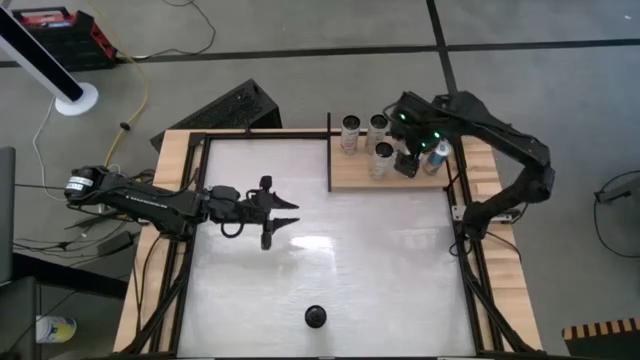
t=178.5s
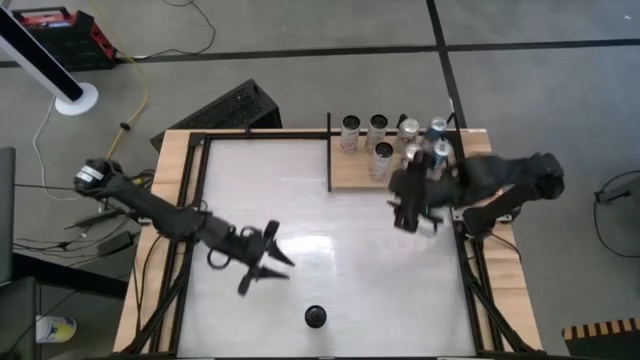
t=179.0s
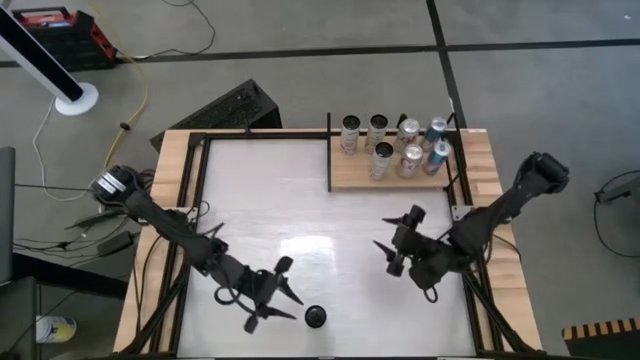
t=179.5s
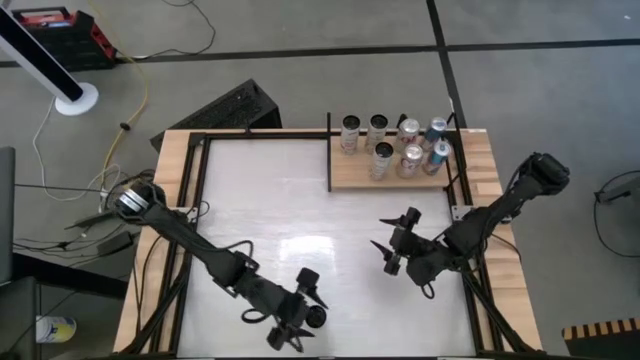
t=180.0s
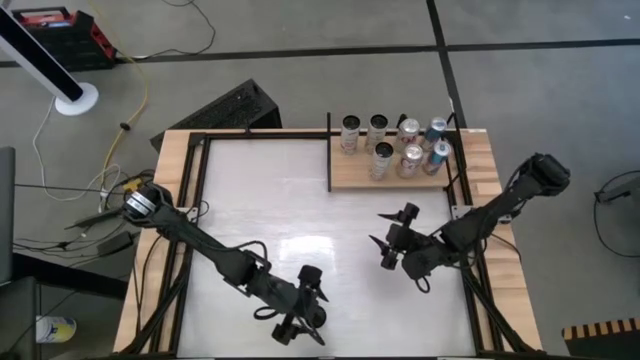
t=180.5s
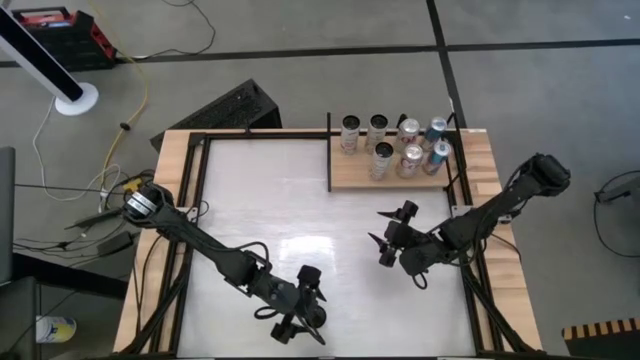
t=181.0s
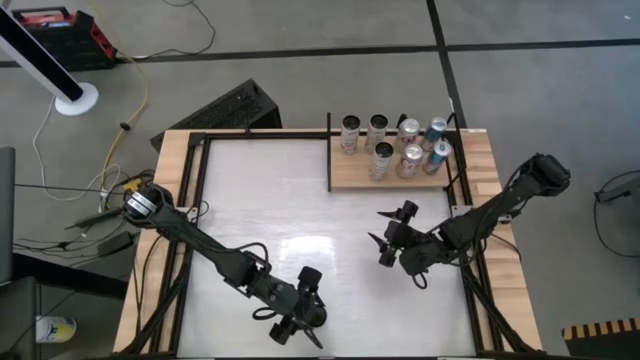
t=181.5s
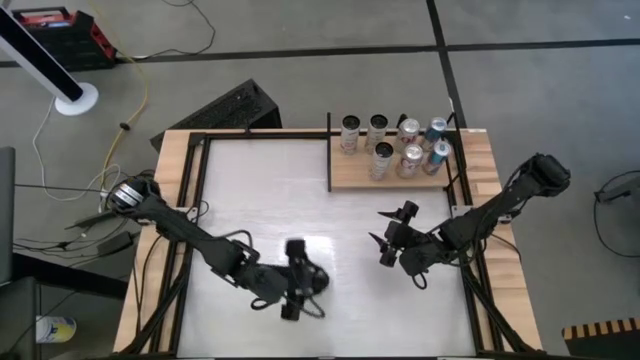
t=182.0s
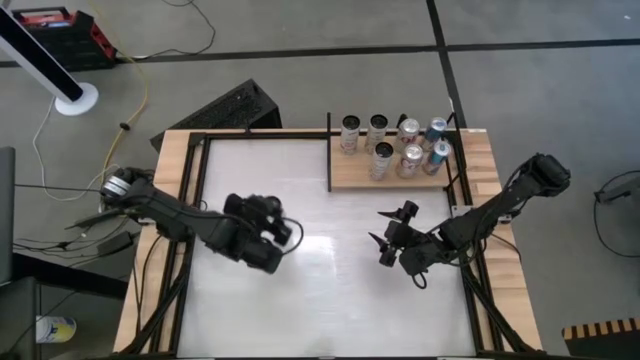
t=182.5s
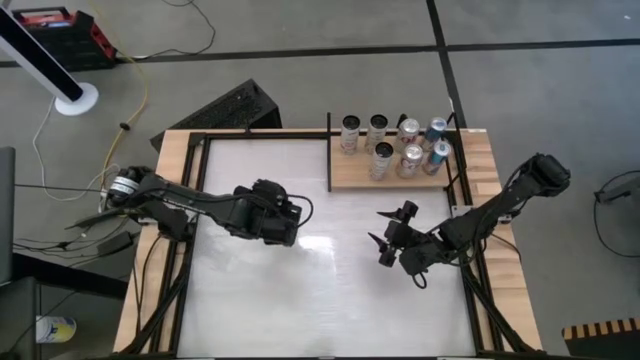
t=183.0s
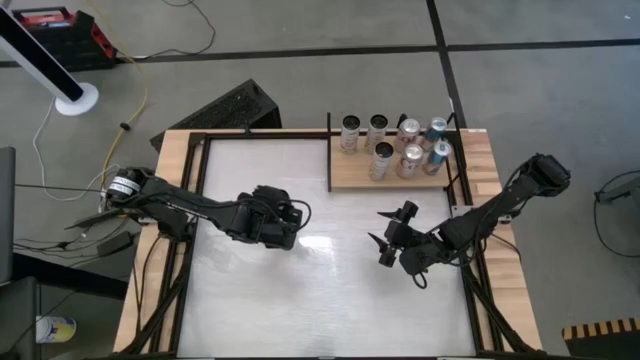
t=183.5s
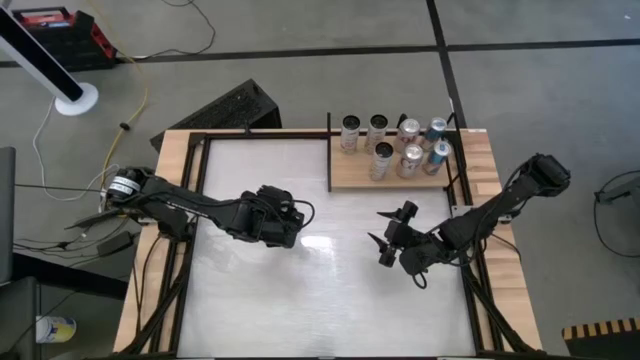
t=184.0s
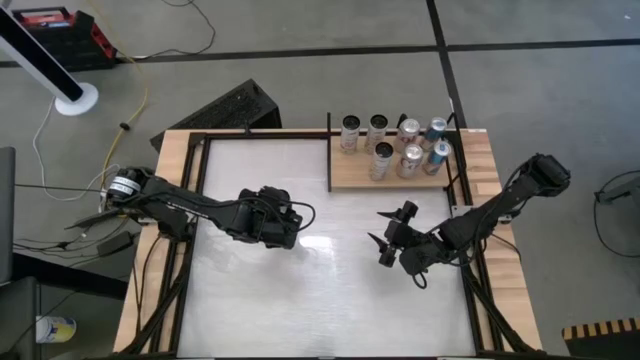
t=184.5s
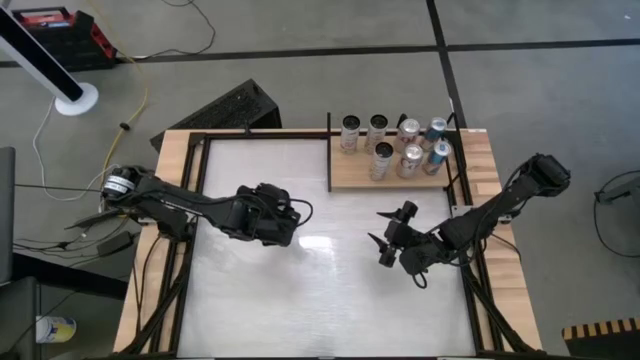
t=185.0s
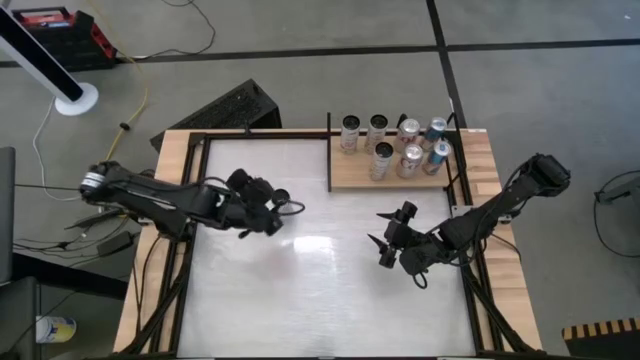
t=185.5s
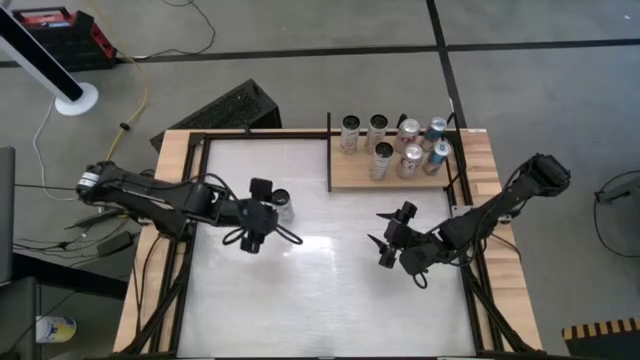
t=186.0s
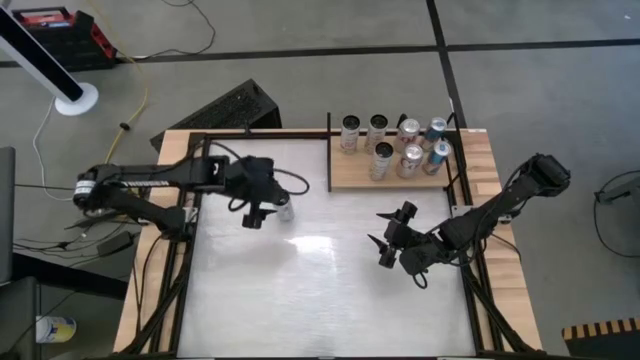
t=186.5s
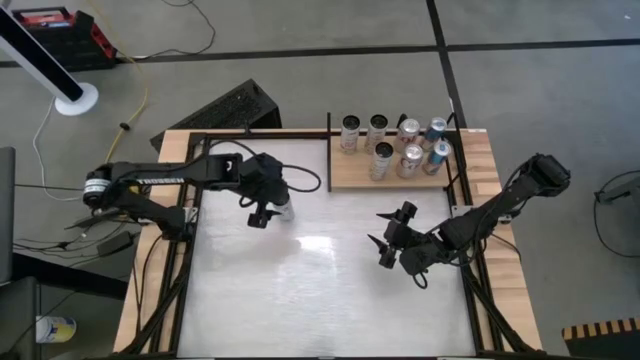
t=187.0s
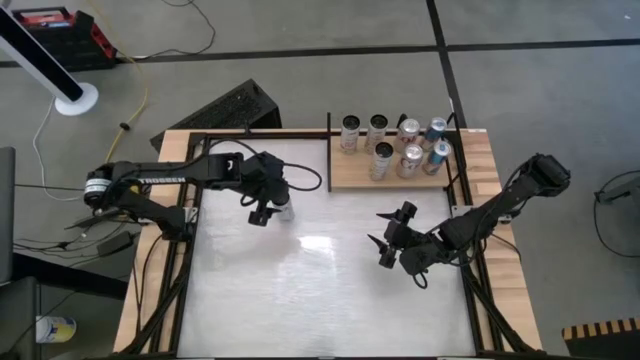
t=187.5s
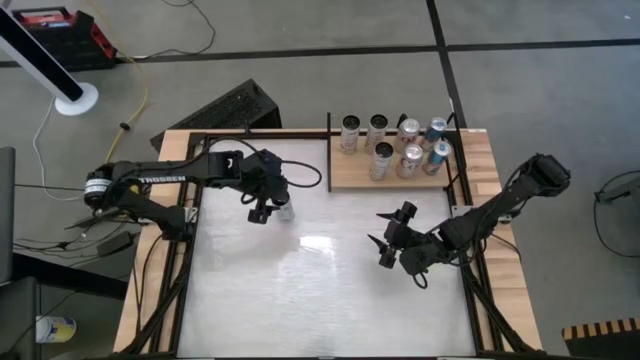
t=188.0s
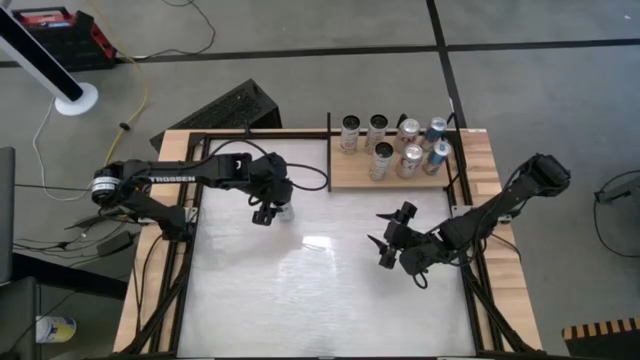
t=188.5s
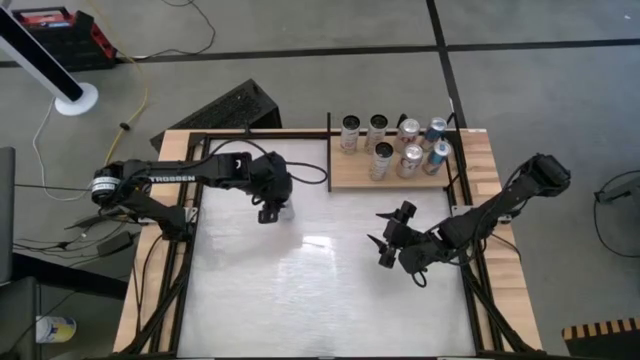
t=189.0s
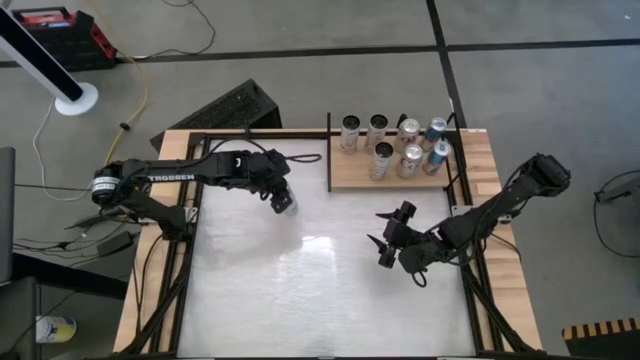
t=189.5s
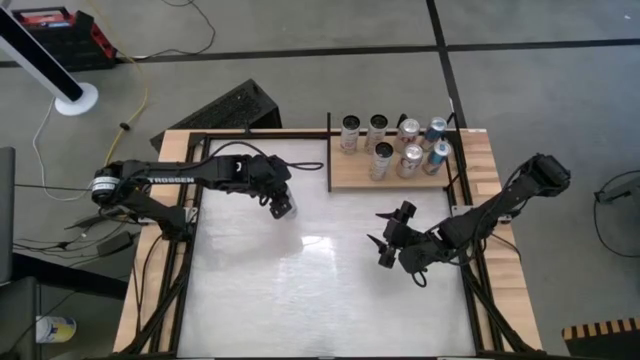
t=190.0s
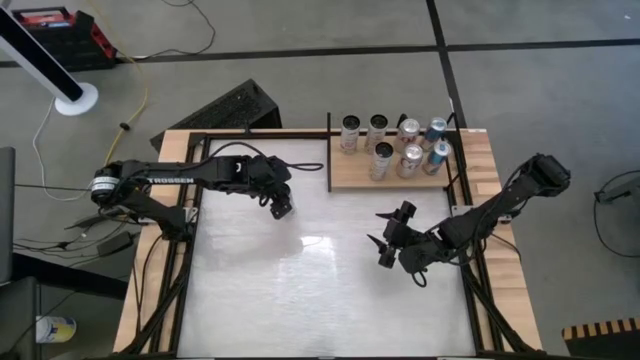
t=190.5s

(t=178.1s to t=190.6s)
Task: Place canned beverage on shelf
Put the white and pink soda can on the shelf aligned with the other white and pink soda can

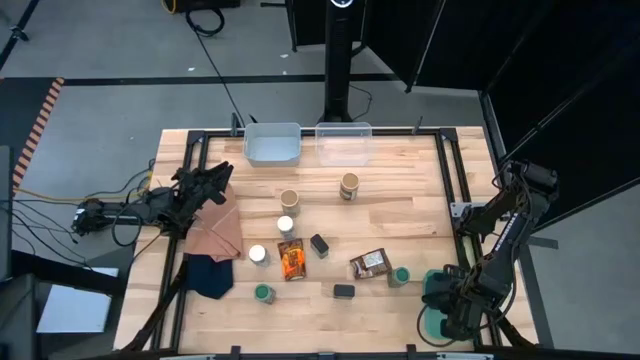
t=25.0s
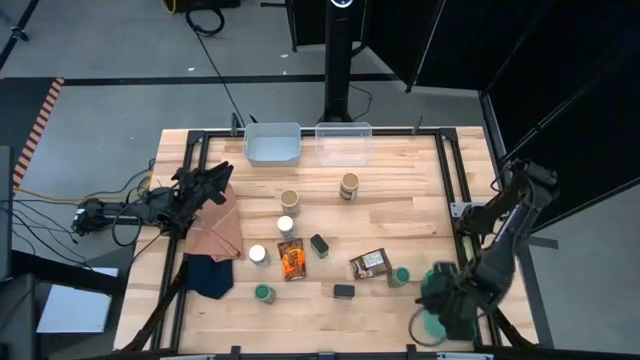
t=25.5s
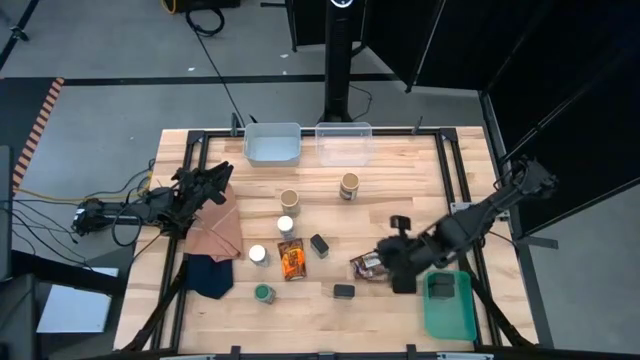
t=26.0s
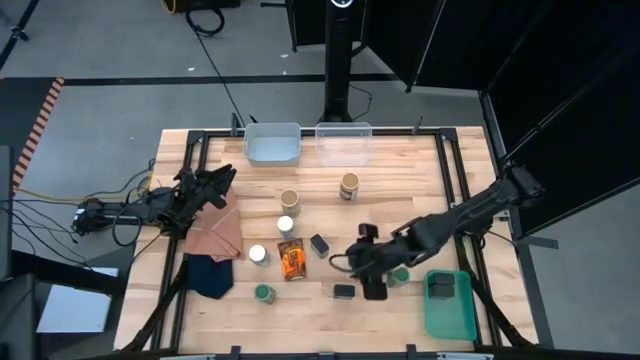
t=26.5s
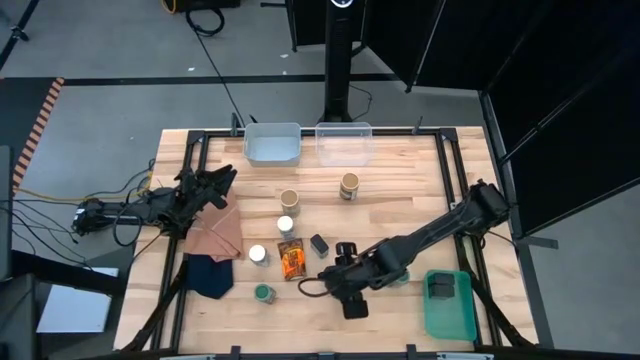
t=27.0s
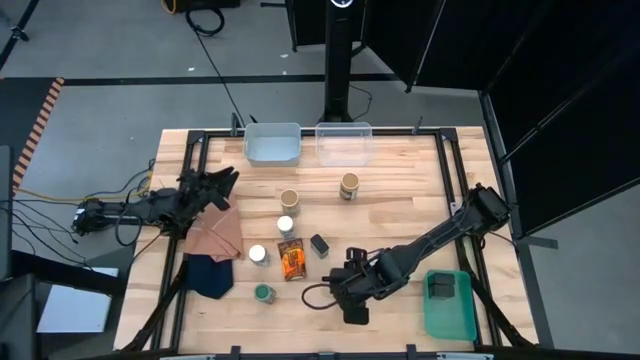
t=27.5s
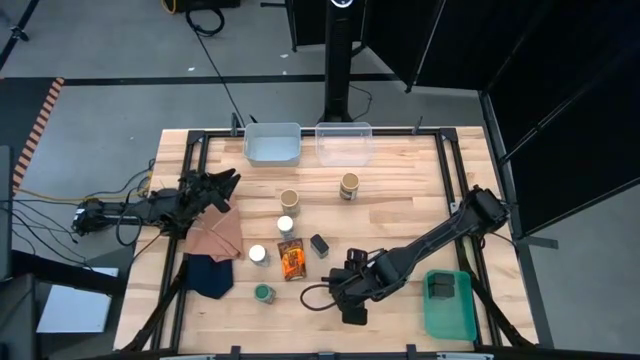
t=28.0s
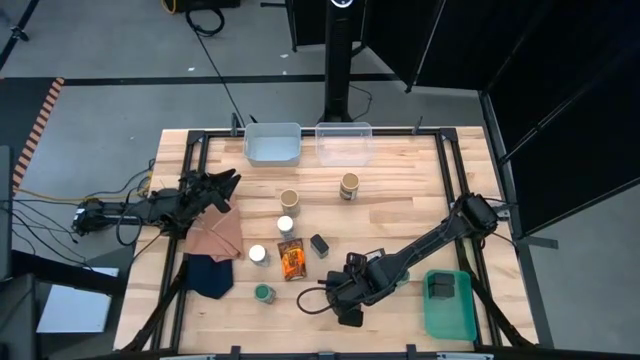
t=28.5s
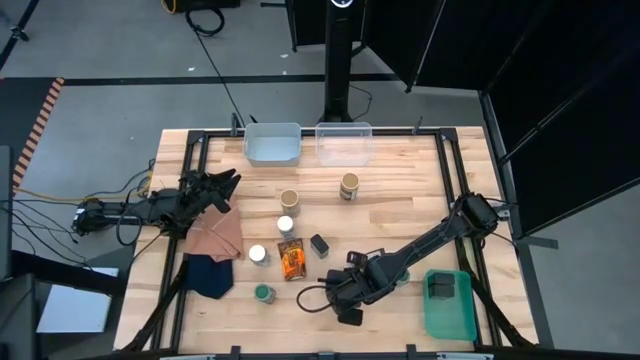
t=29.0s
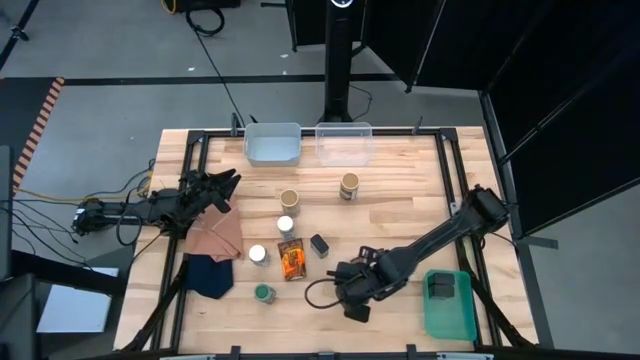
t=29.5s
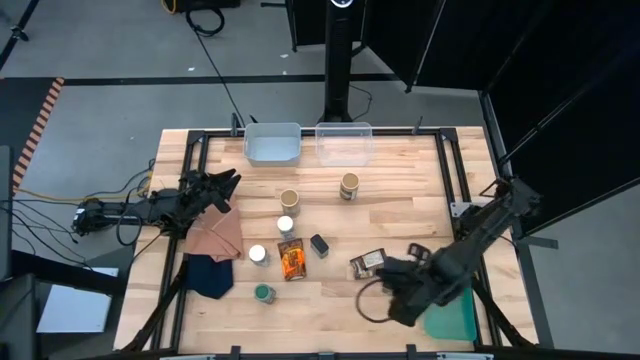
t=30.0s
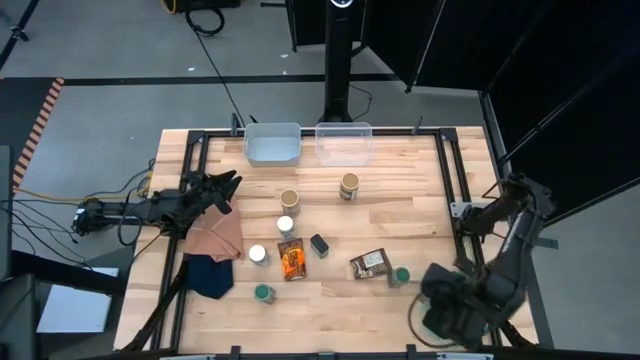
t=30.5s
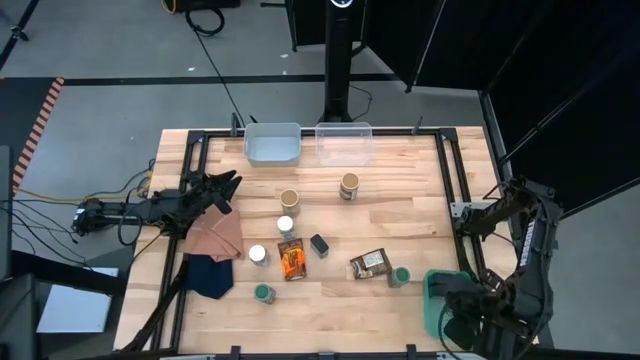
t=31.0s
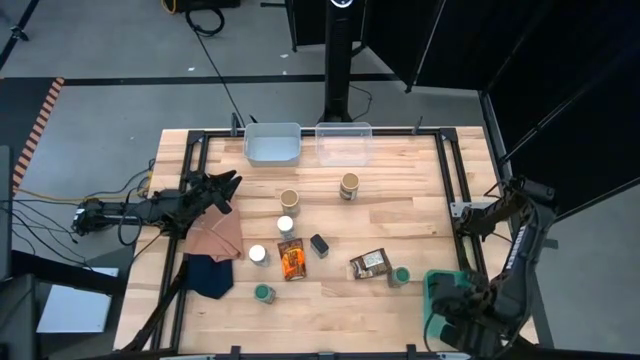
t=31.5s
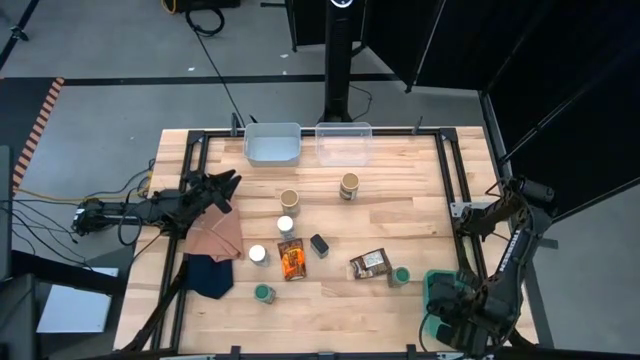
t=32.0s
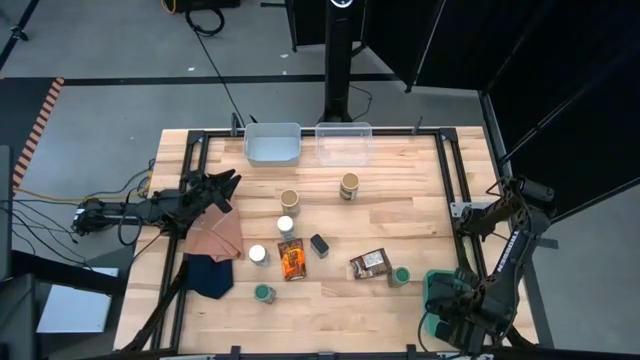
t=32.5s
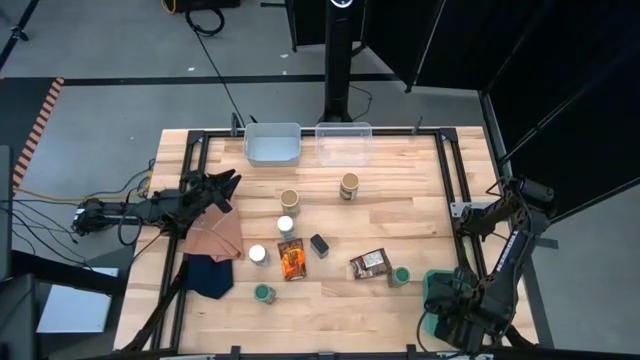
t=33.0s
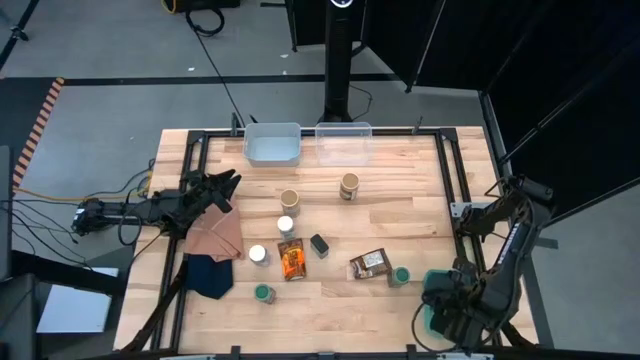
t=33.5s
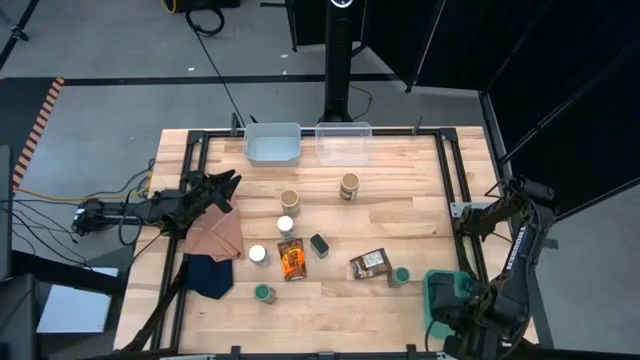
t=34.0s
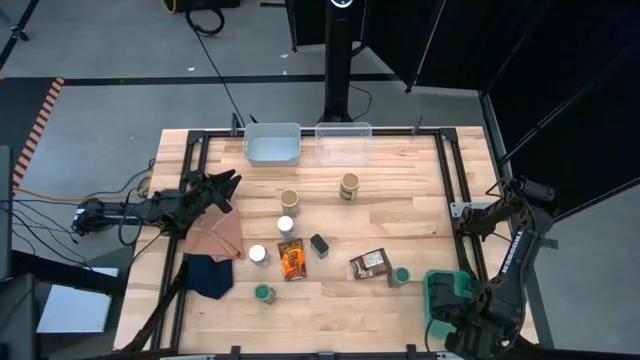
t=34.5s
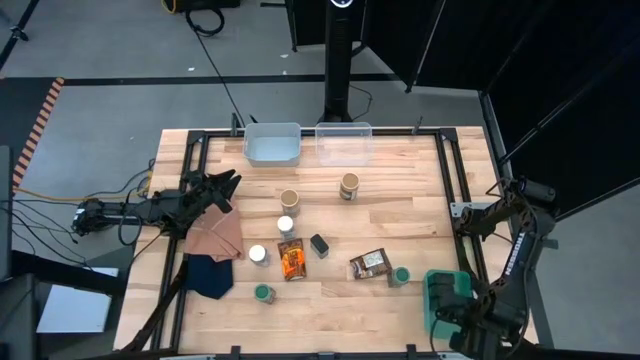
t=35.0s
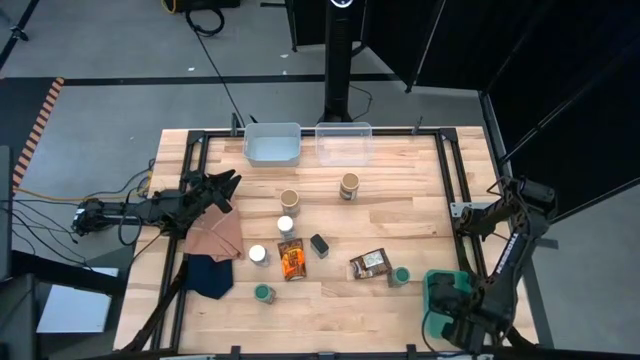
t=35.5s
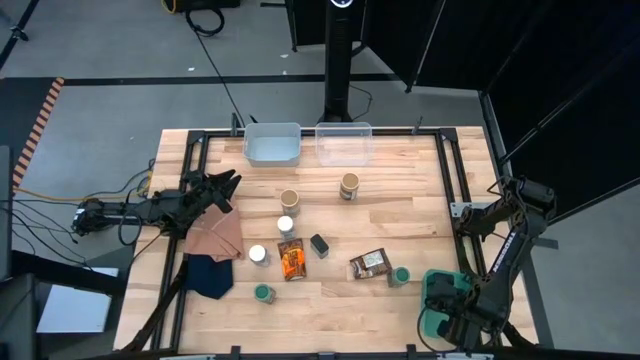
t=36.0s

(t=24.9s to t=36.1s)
Task: Sort spices by type
Put the bottom black seasoning can into the green bin
